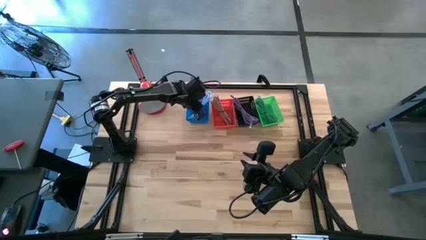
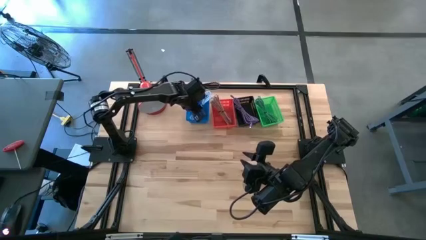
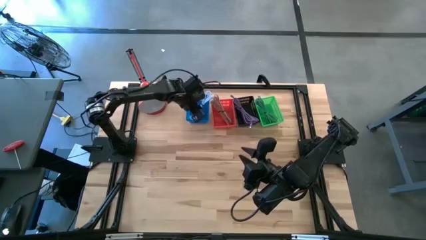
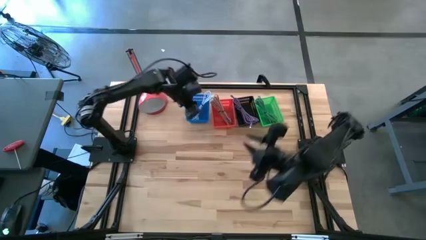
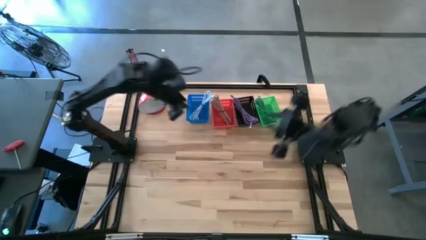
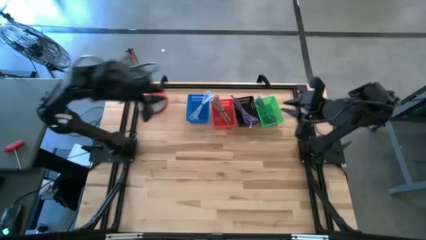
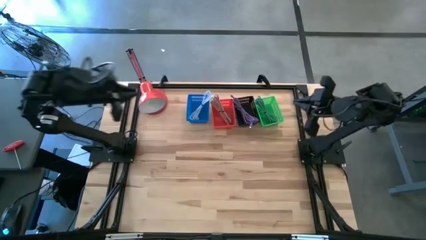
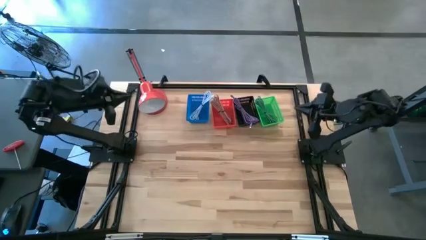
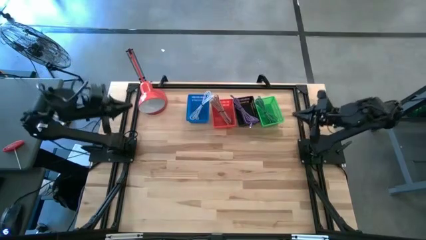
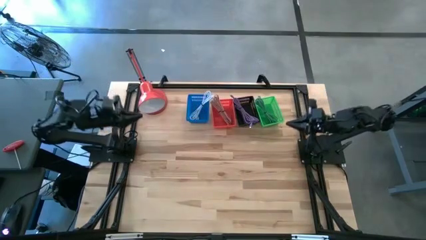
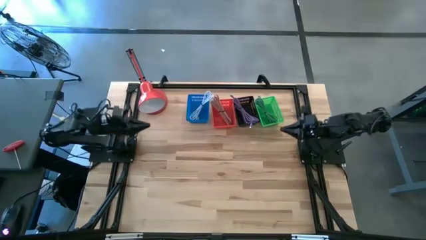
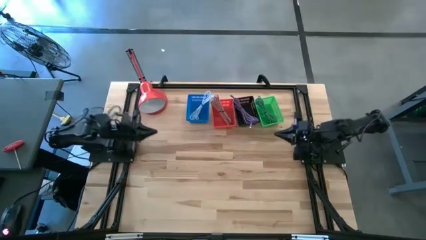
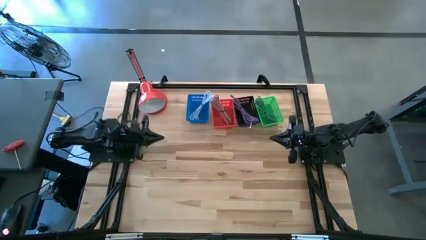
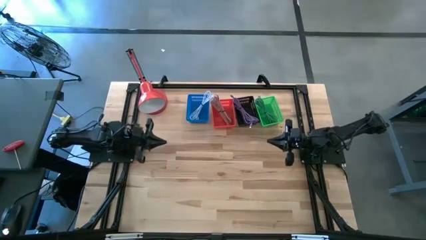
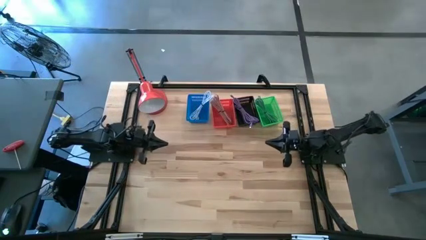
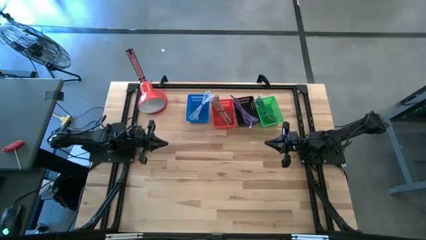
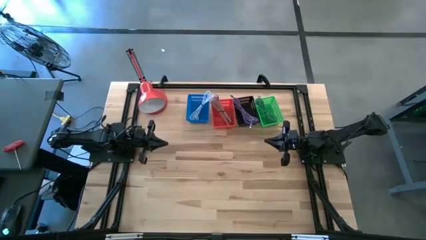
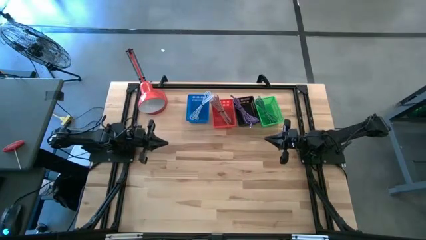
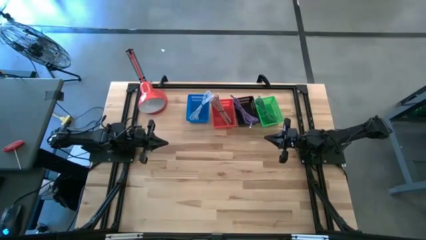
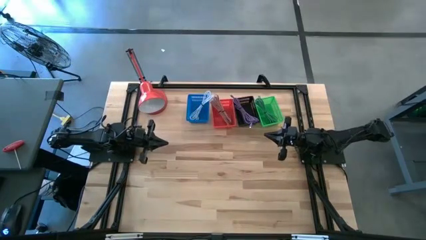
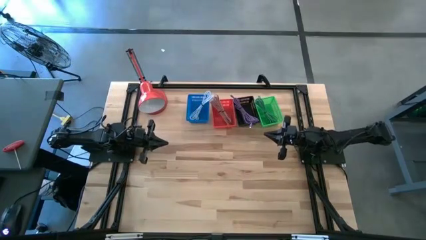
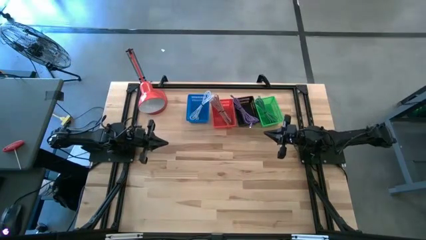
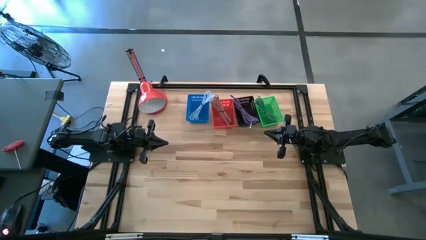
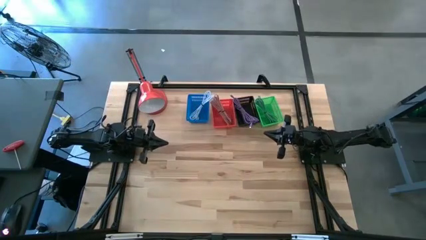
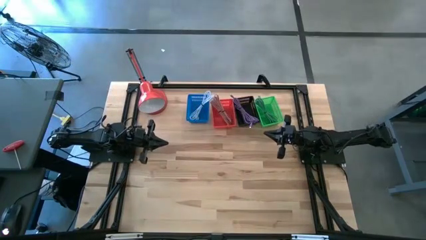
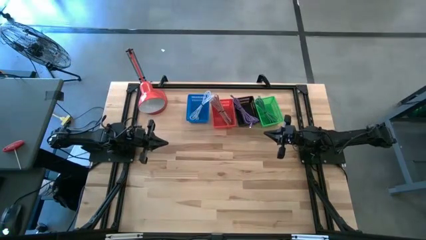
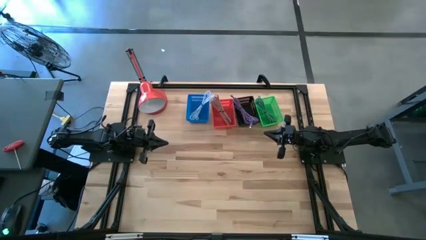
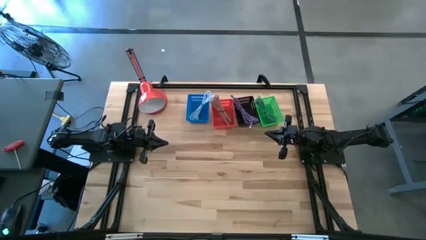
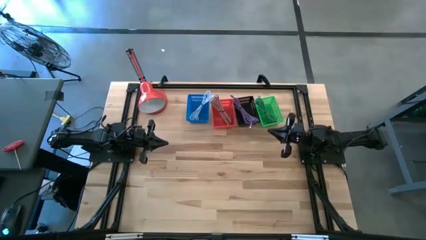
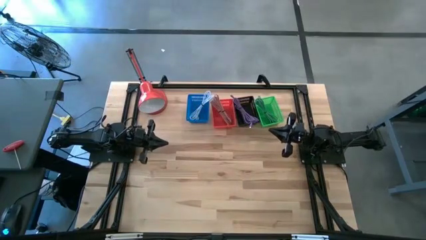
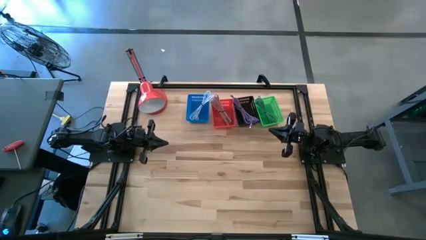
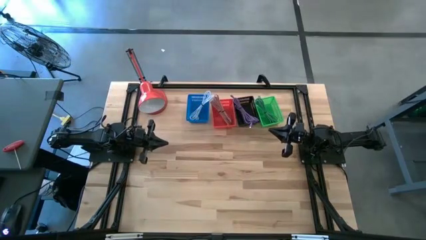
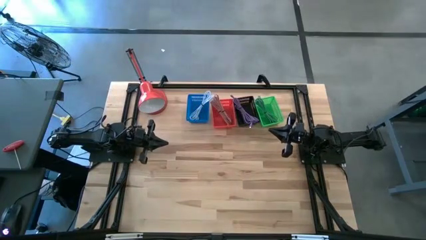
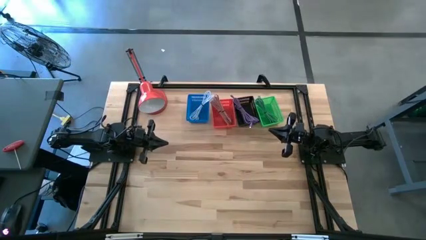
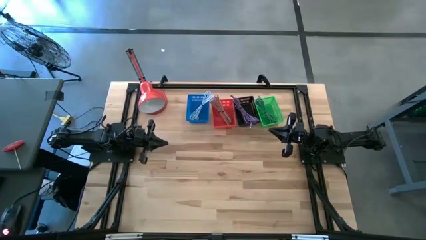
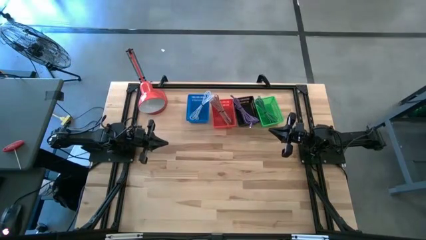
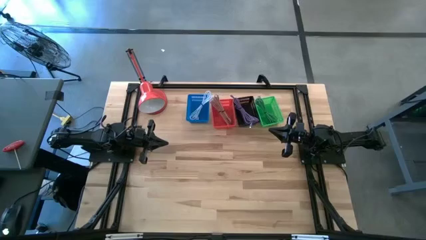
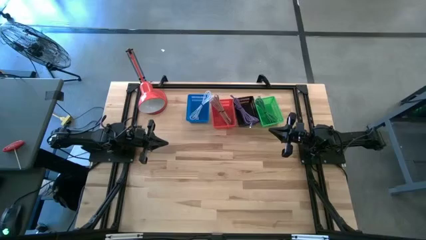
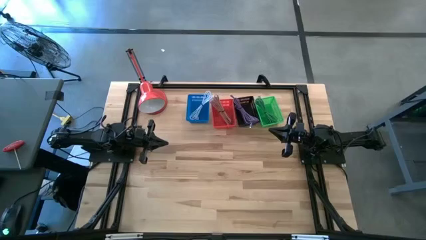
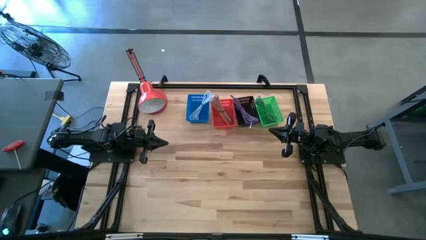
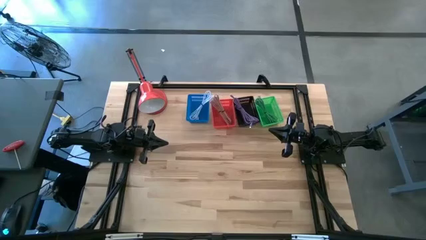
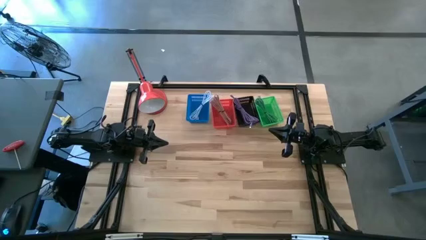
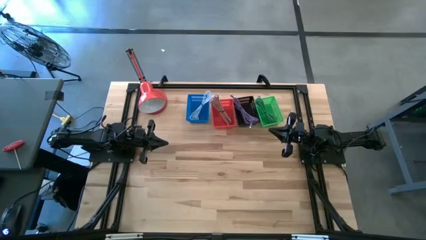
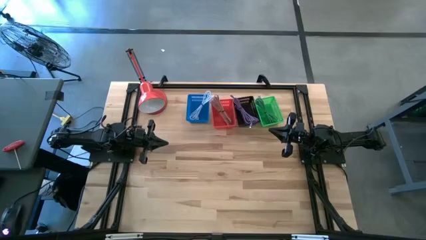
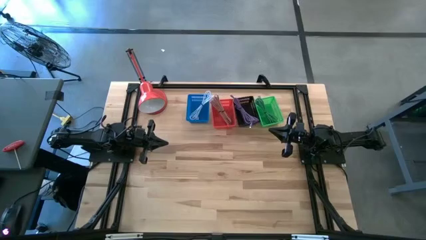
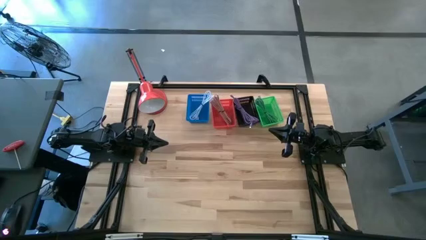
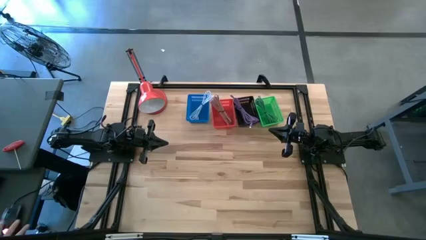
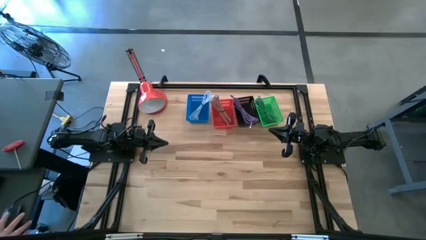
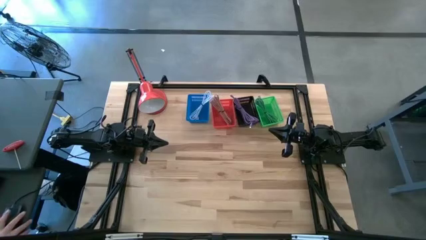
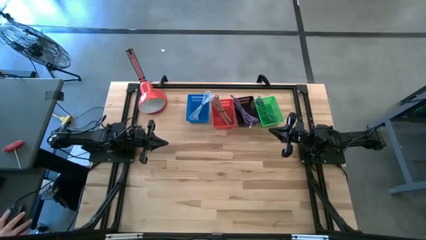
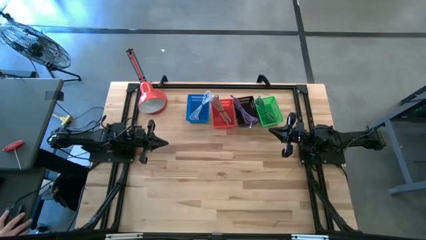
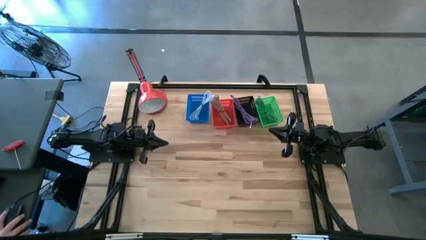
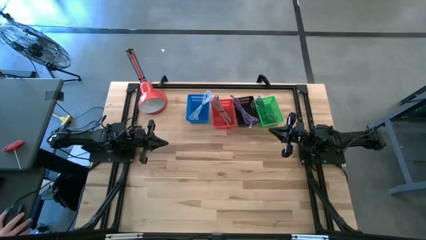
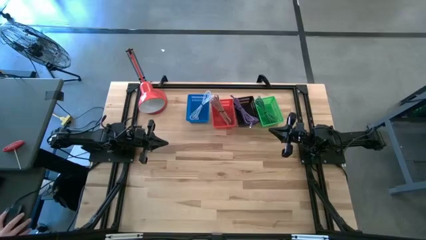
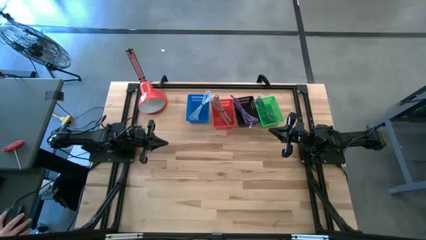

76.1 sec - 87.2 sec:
Task: Pick & Place USB Port
Return to Home Position

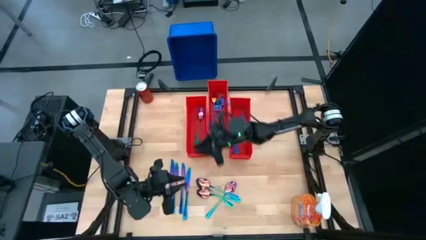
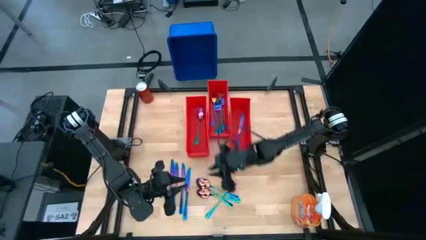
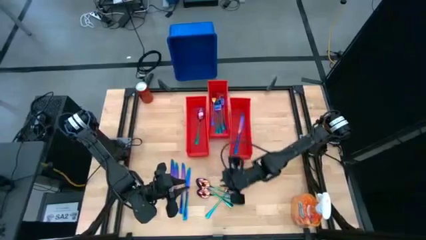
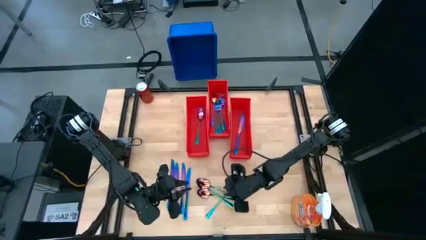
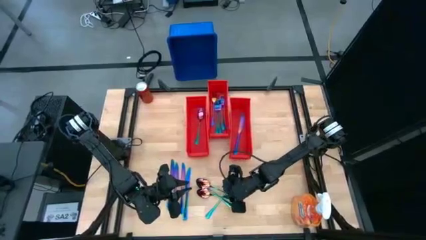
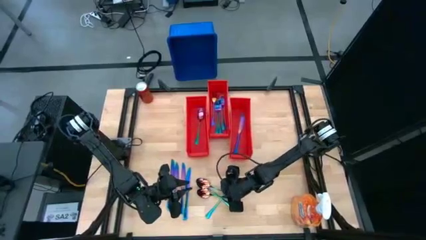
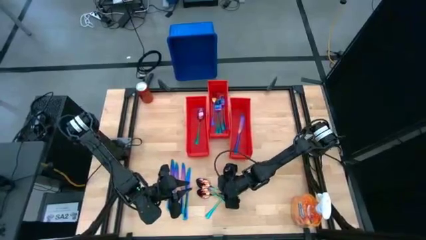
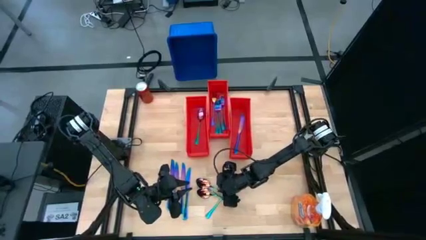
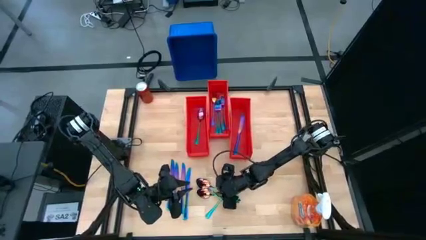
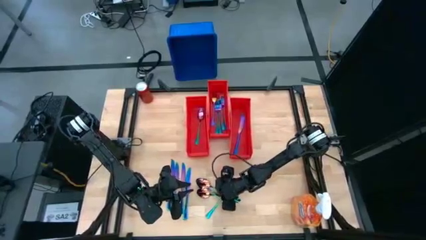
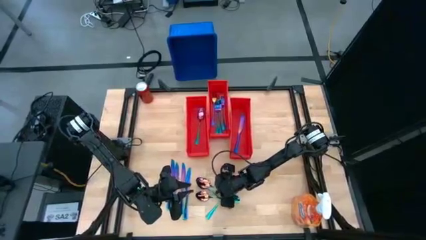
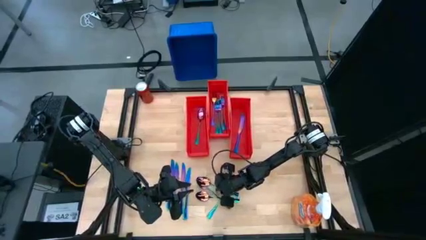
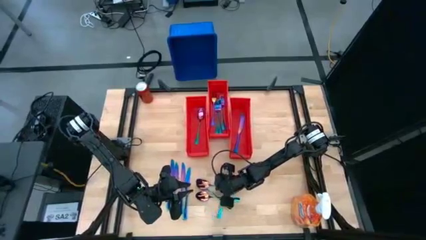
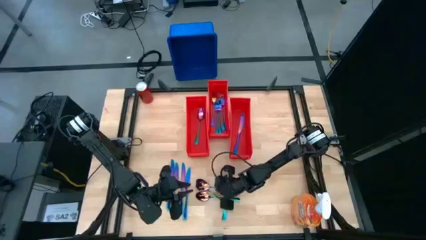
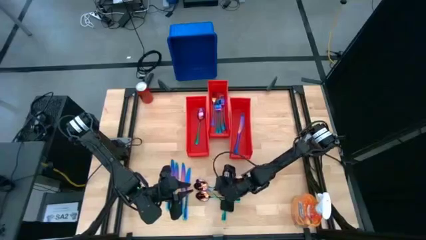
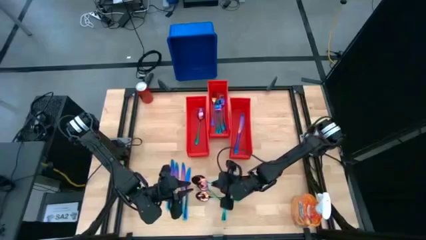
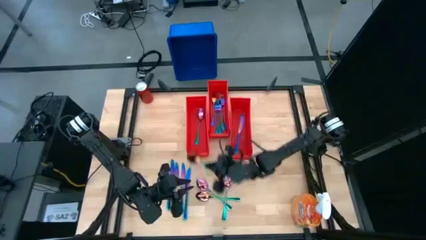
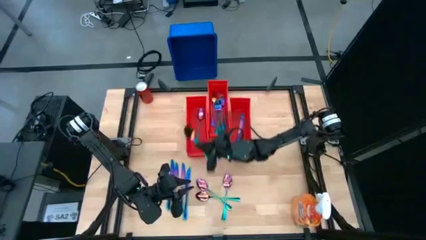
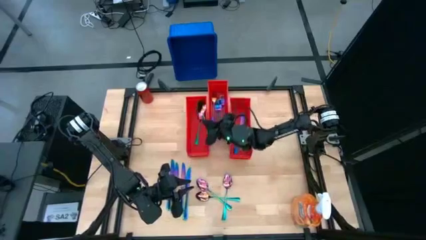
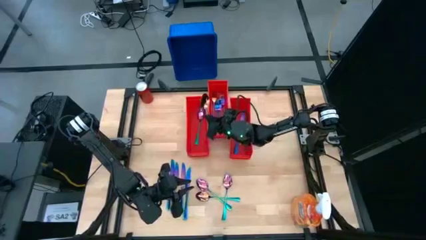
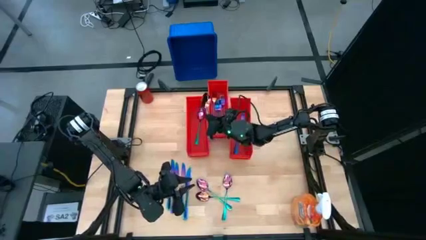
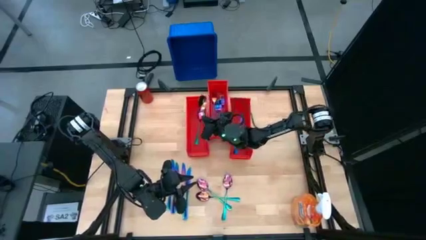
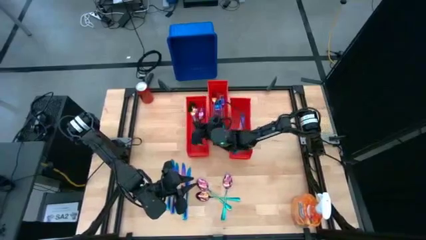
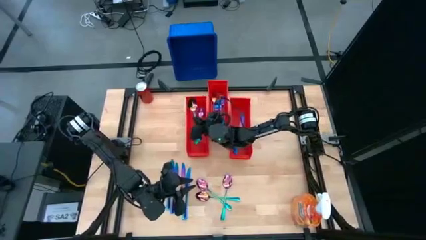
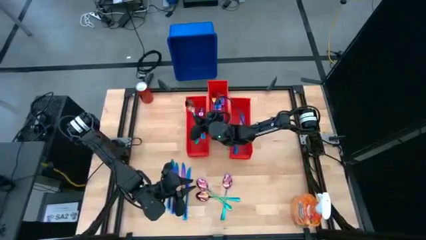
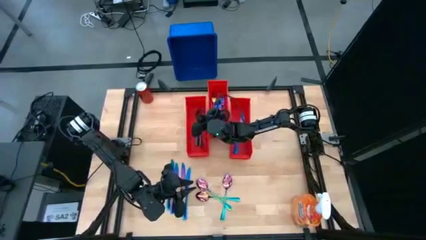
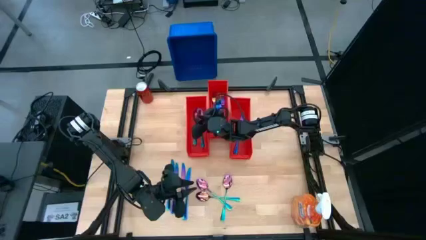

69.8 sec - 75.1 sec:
Task: Sort silverware
Put the iridescent spoon into the left orange bin
